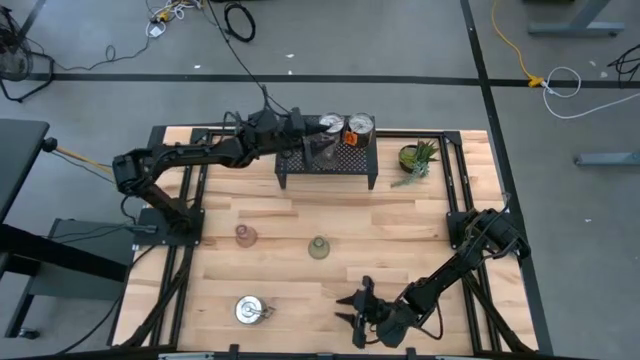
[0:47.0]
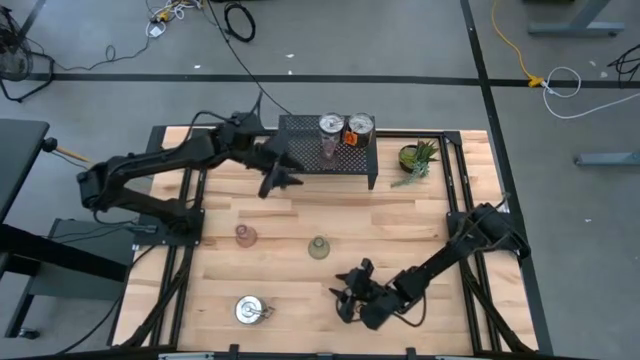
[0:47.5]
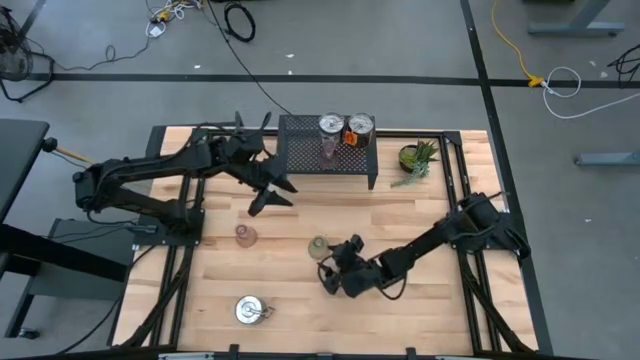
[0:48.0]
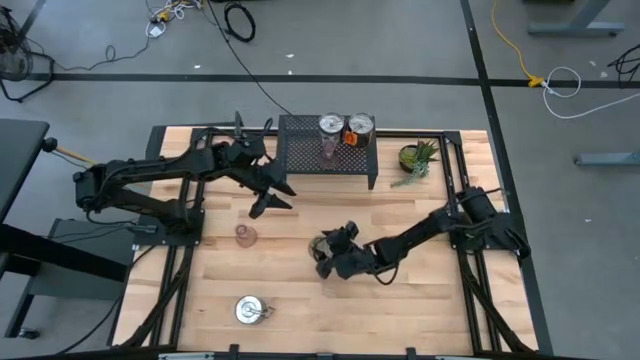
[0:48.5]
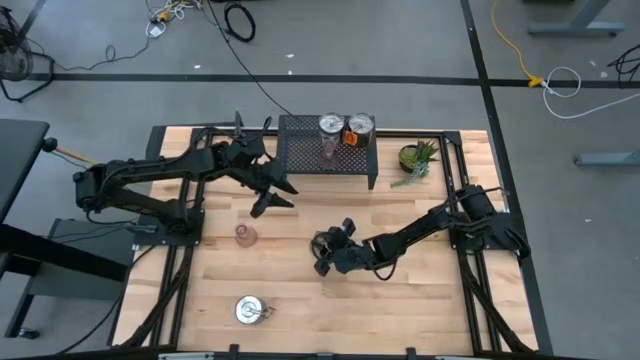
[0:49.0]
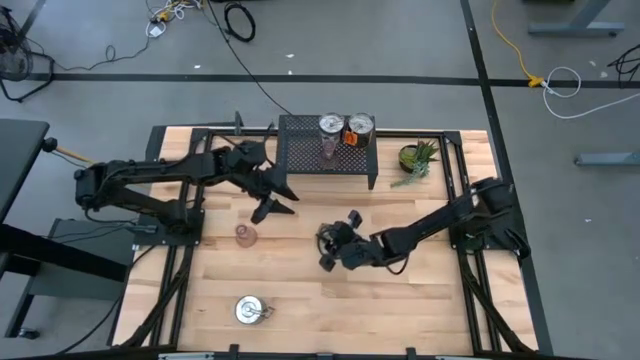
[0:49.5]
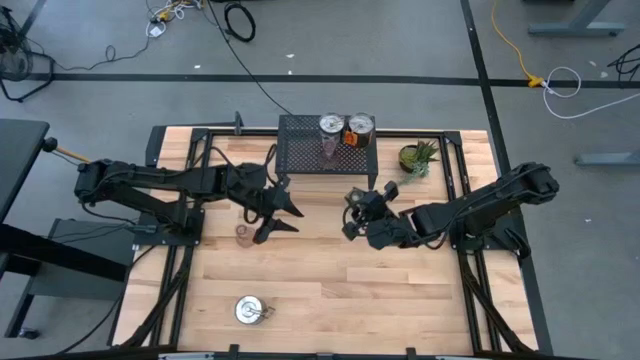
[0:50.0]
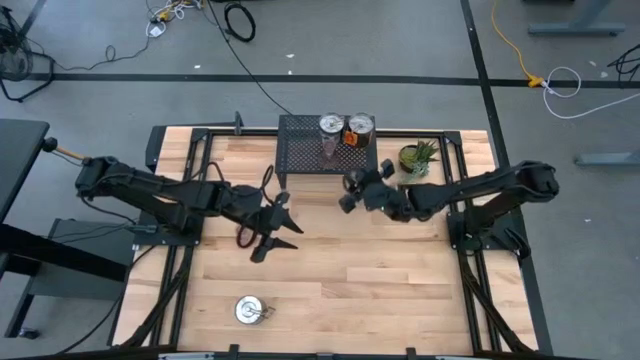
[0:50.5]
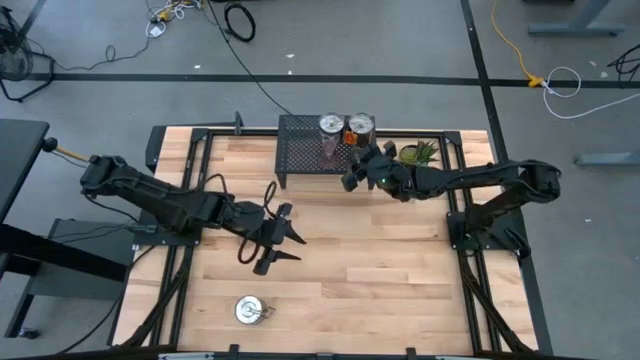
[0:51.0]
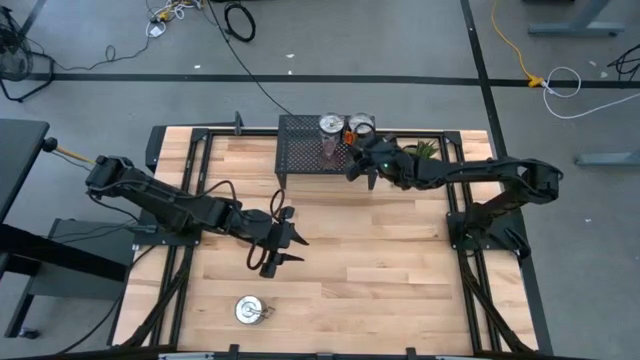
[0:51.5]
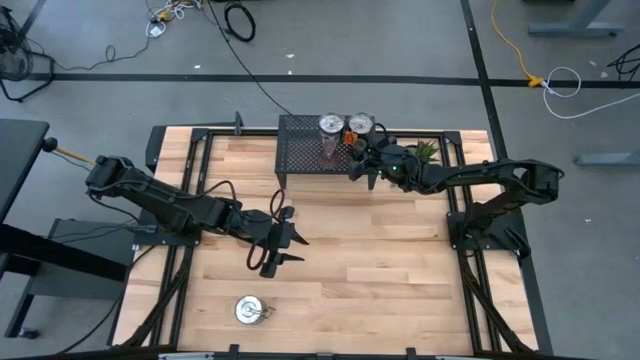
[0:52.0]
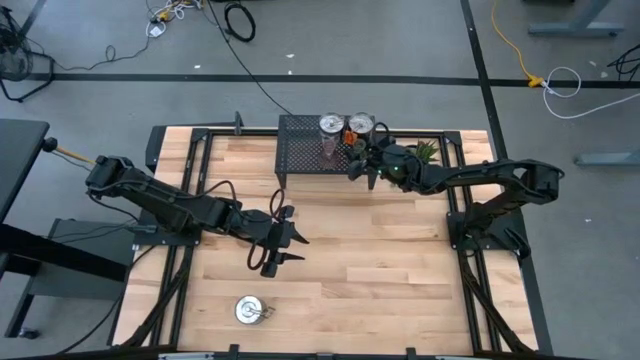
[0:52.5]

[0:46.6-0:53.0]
Task: Pick & Place candle stick holders
Put the green candle holder on the shelf aligned with the pink candle holder

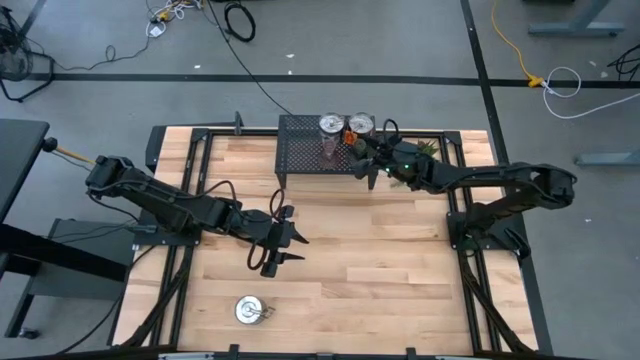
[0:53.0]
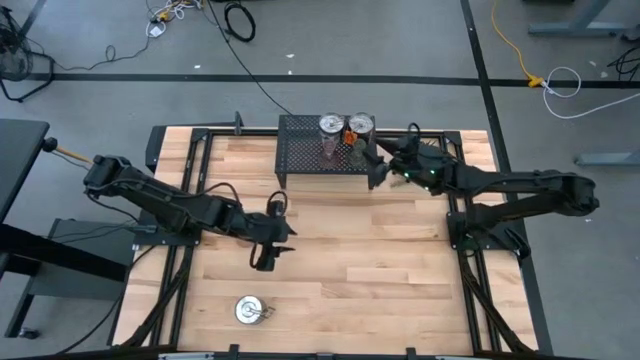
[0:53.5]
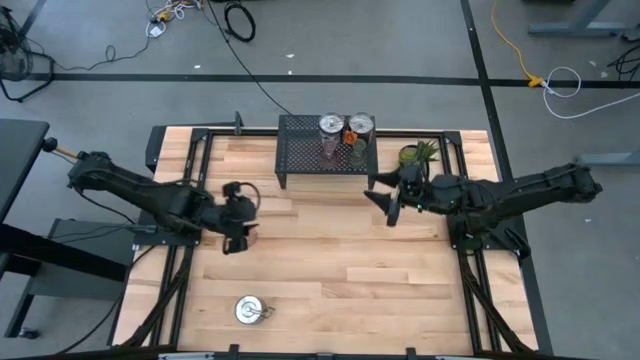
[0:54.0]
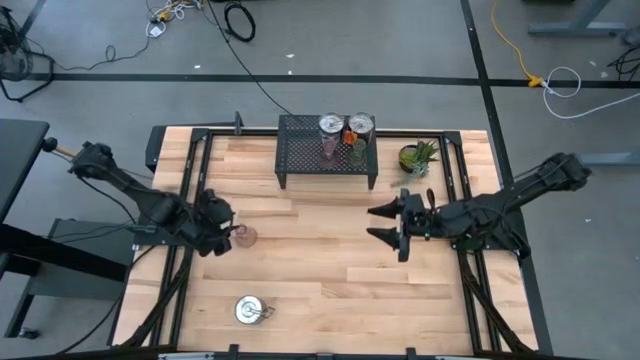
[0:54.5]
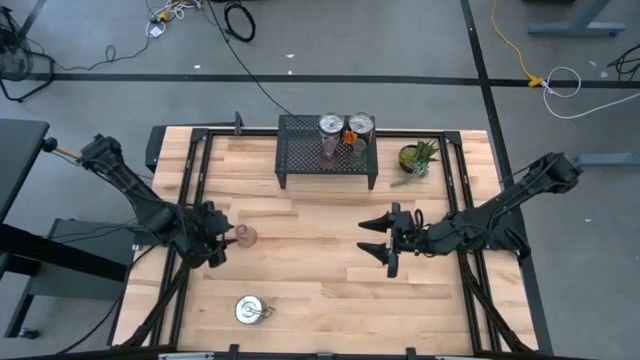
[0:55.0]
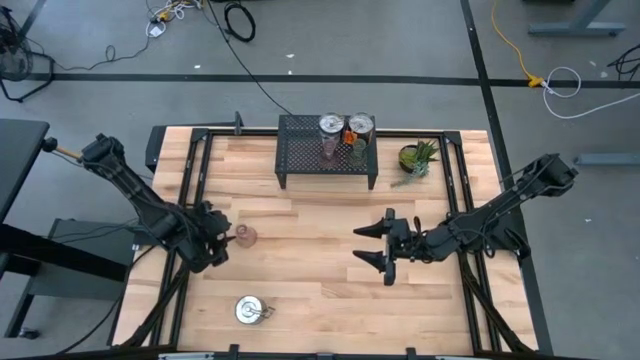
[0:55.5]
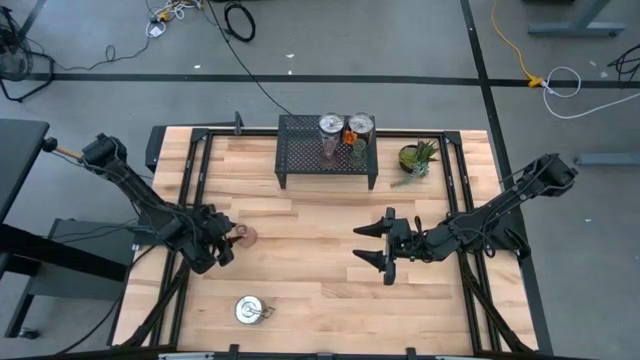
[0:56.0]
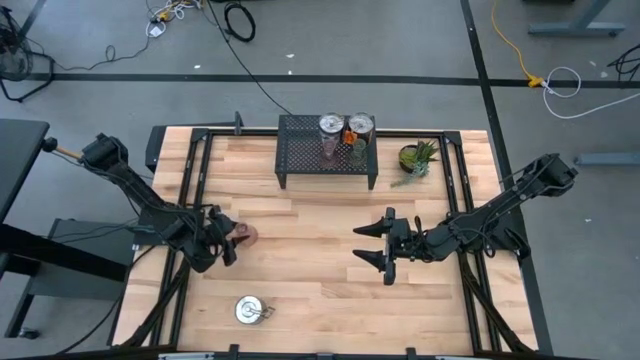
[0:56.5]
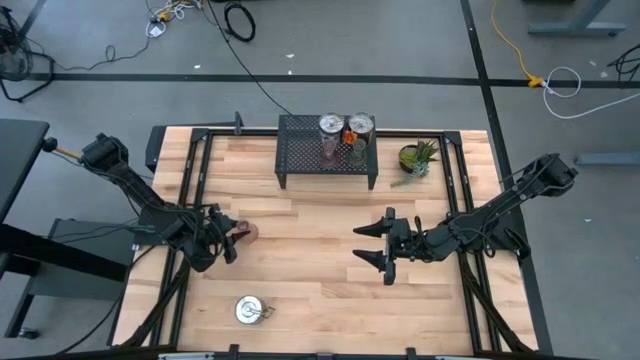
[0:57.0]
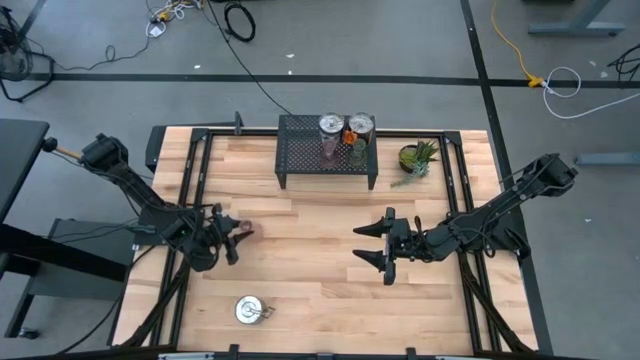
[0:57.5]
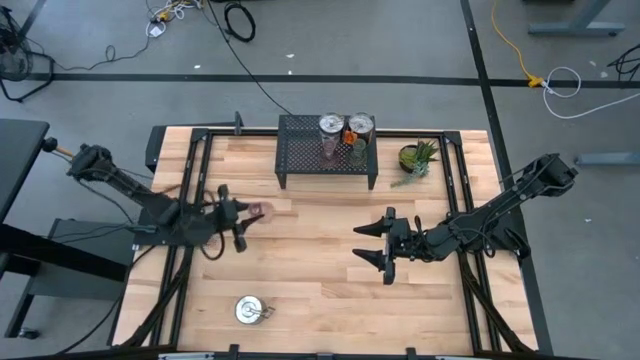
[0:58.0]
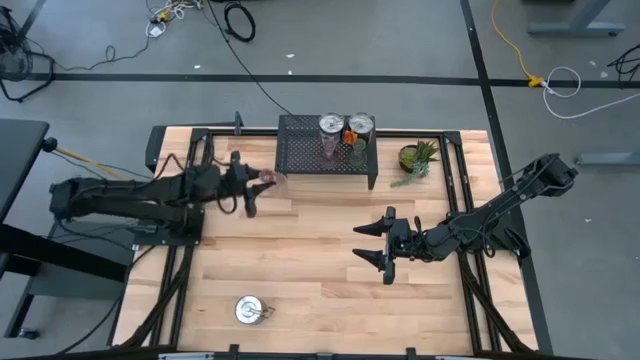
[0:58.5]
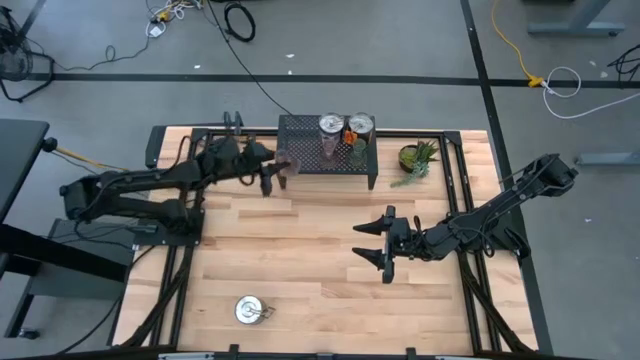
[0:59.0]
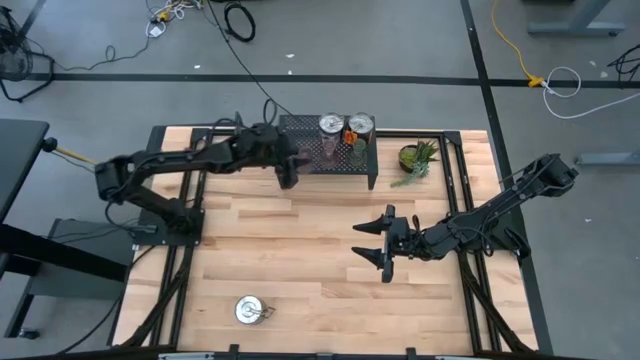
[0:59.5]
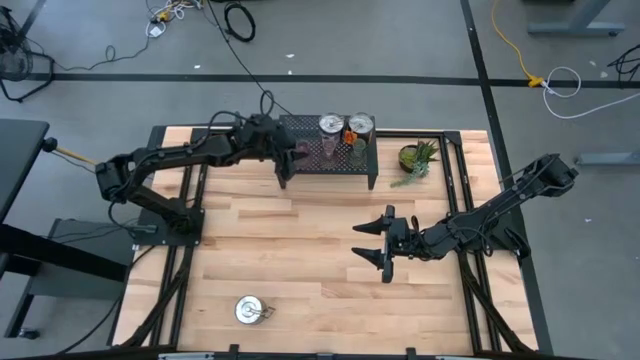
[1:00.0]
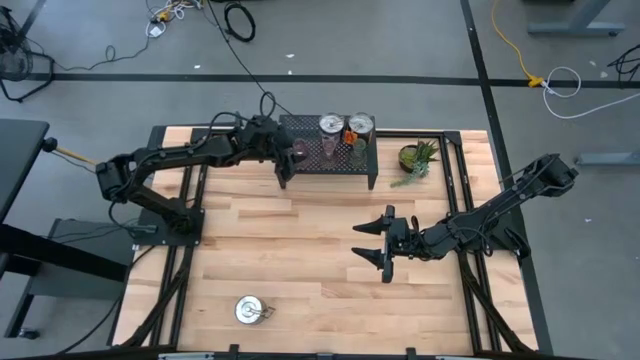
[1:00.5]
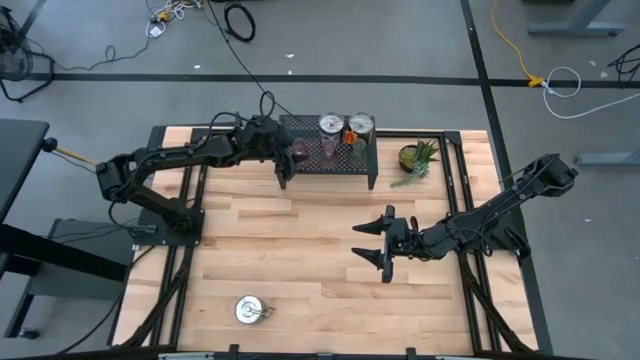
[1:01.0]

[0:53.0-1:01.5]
Put the pink candle holder on the shelf aligned with the pink and green candle holders

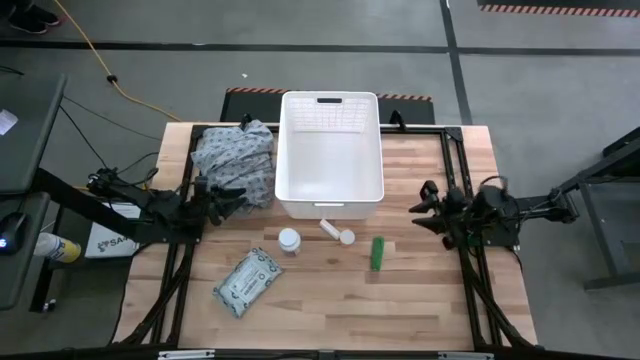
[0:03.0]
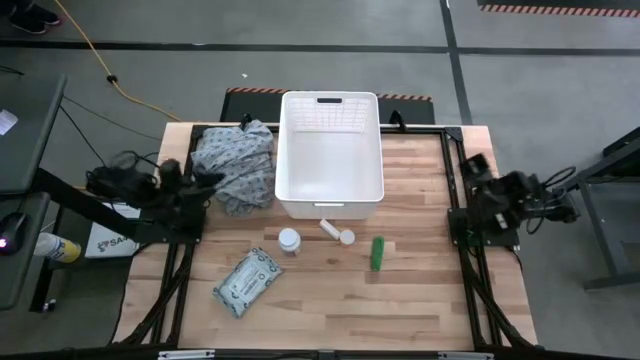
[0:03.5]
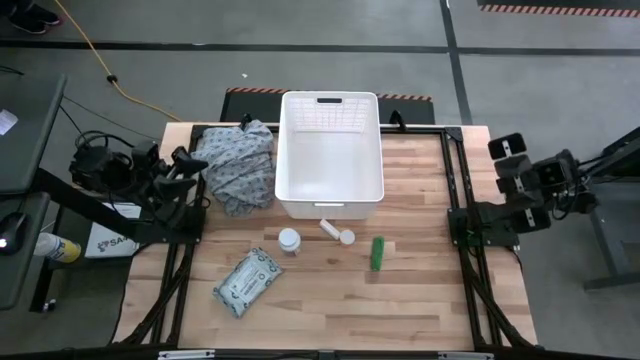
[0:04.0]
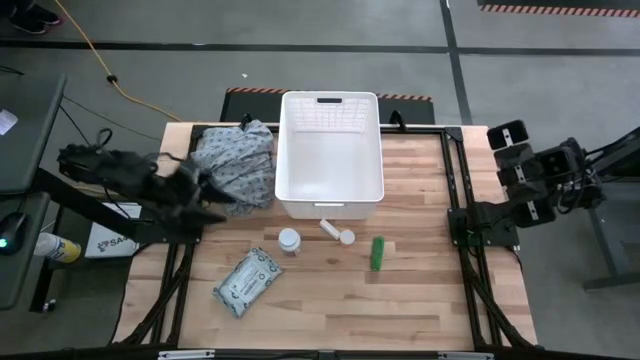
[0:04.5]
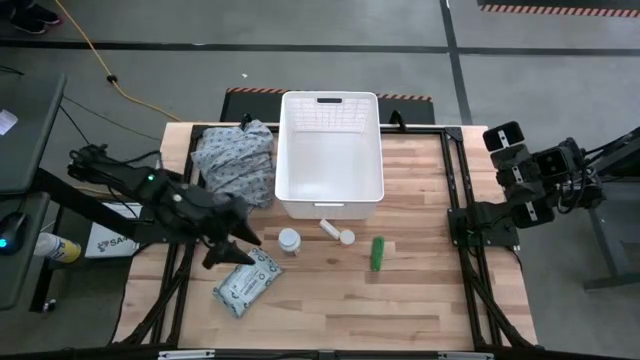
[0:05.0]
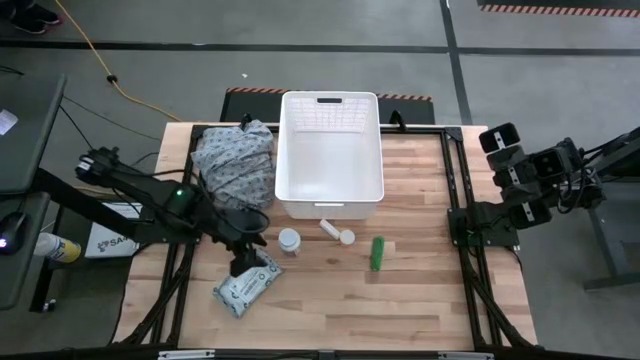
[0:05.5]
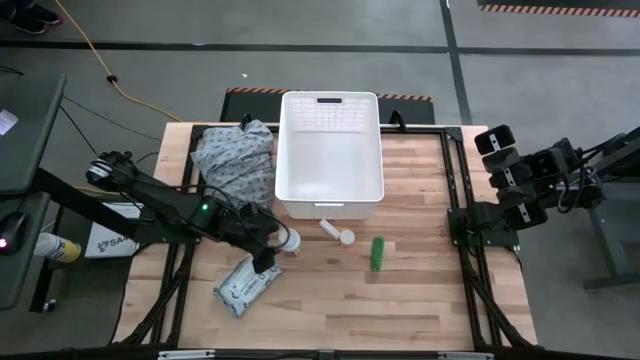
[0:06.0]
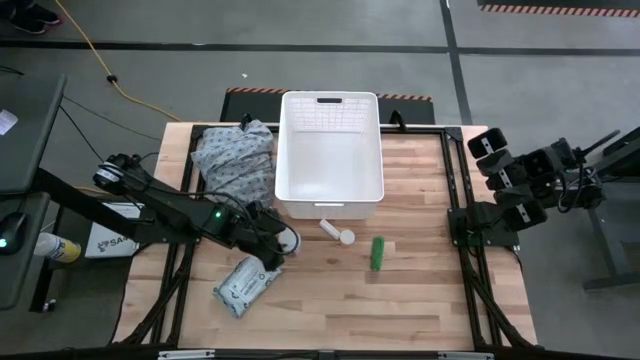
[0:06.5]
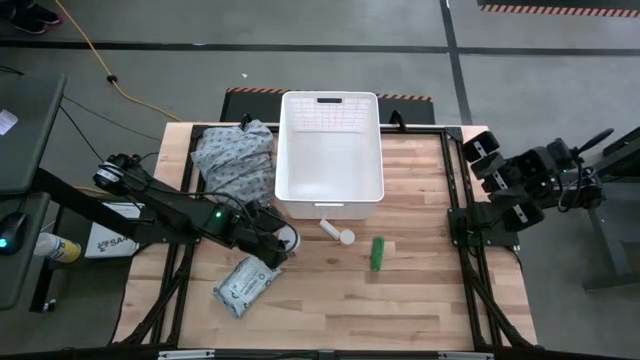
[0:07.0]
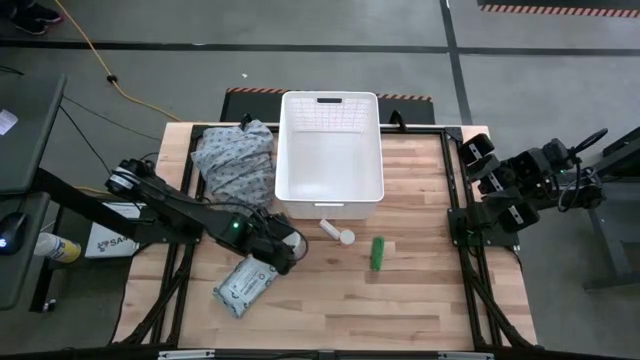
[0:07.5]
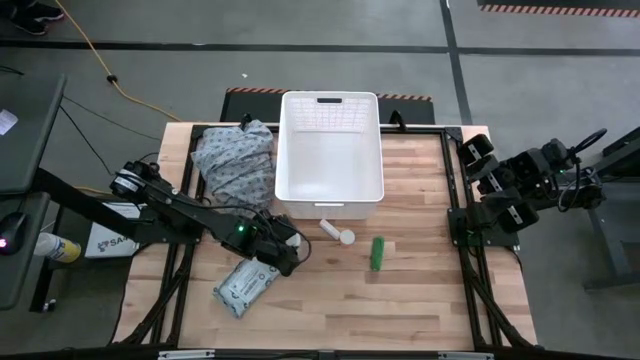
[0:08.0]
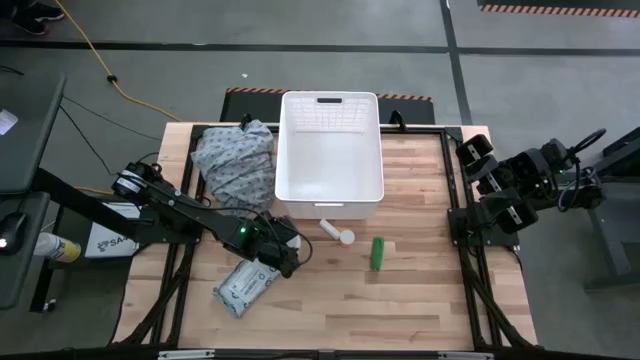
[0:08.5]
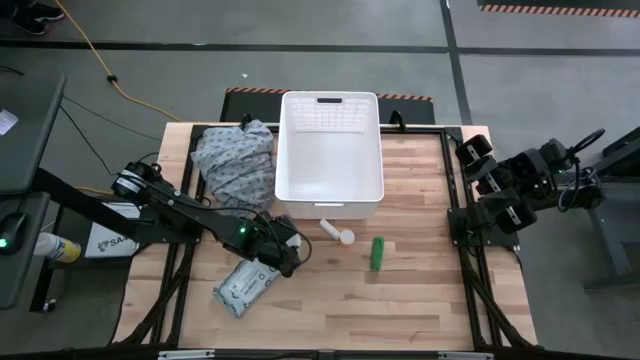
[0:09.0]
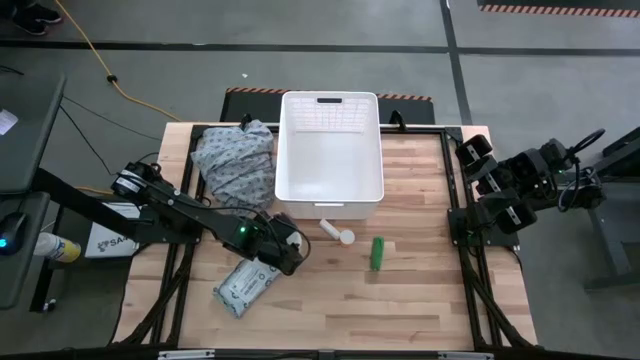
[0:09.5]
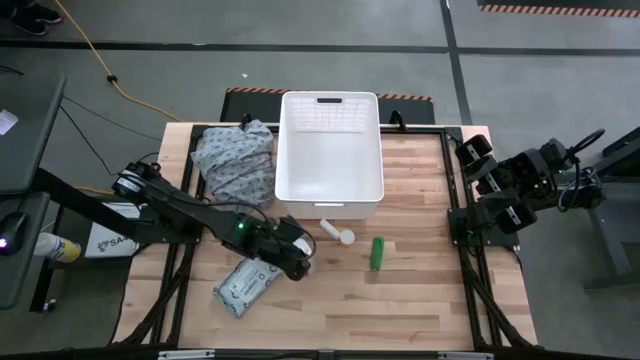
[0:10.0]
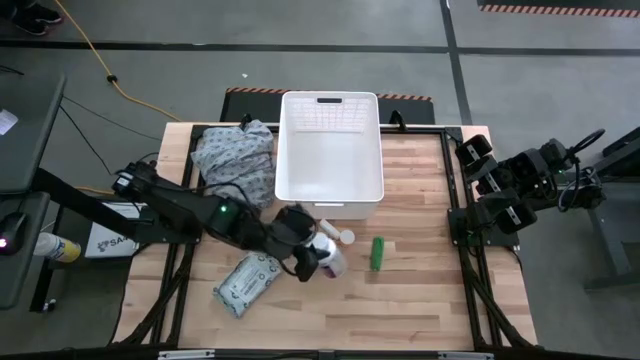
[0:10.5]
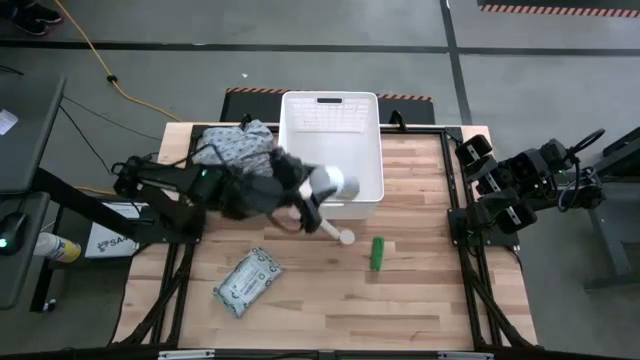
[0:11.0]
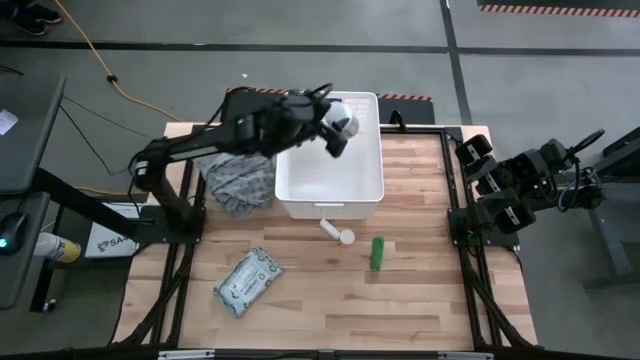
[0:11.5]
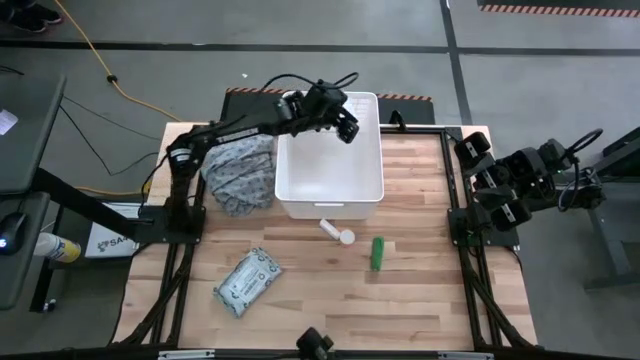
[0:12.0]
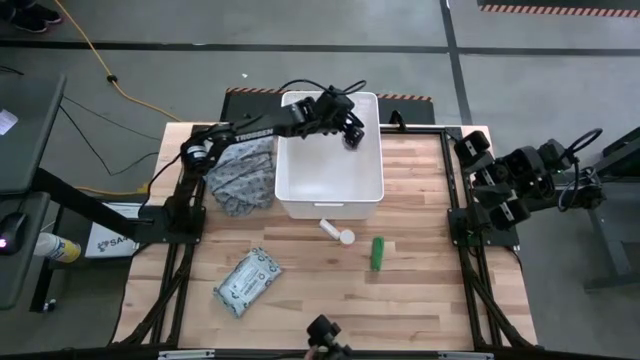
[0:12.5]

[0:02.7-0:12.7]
Task: Pick & place medical supplies in basket/bin
Put the white pill bottle into the white bin
